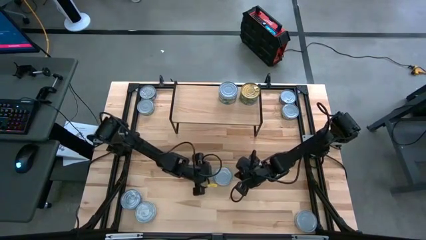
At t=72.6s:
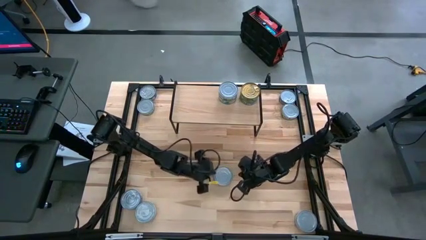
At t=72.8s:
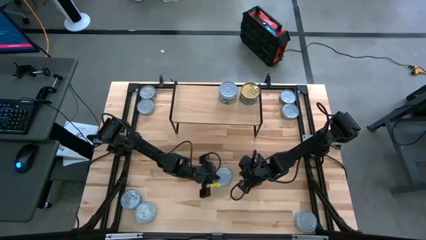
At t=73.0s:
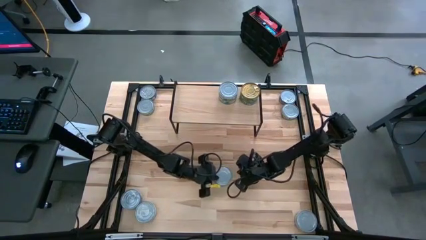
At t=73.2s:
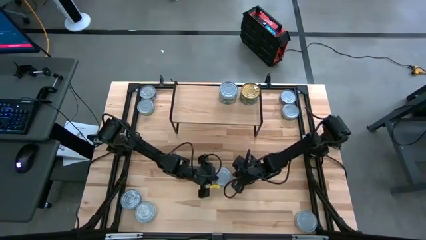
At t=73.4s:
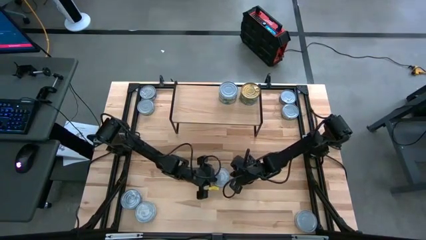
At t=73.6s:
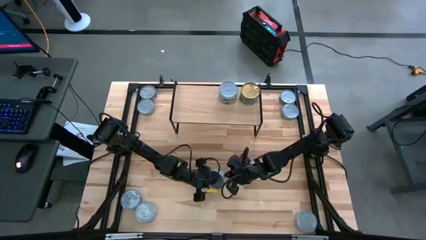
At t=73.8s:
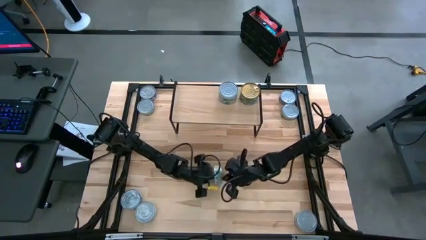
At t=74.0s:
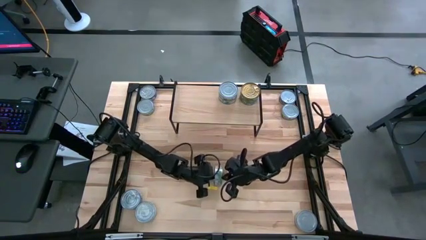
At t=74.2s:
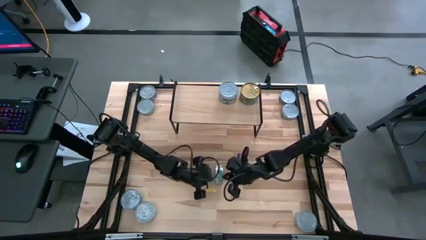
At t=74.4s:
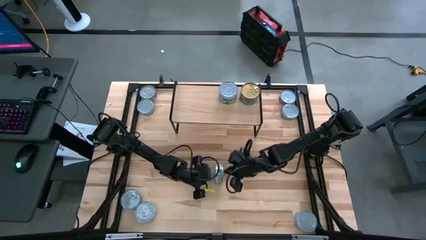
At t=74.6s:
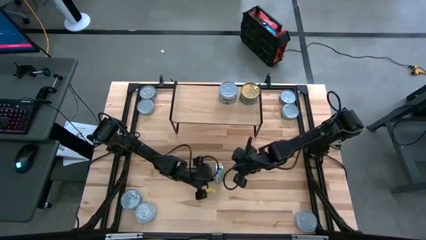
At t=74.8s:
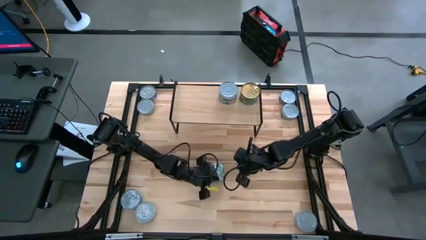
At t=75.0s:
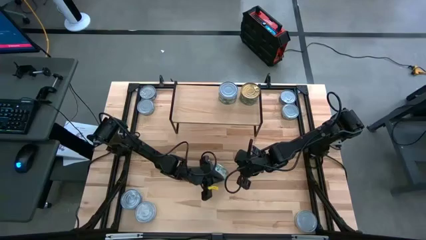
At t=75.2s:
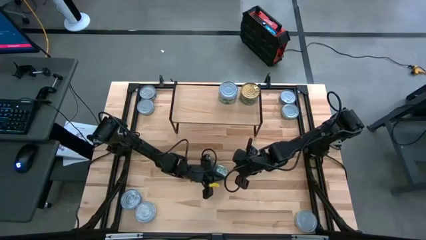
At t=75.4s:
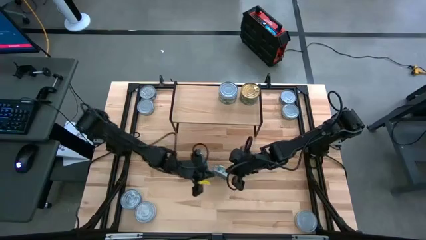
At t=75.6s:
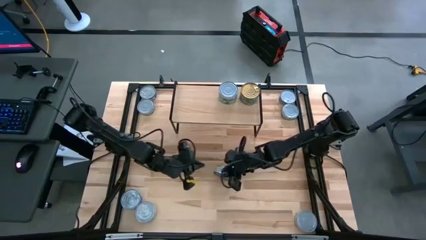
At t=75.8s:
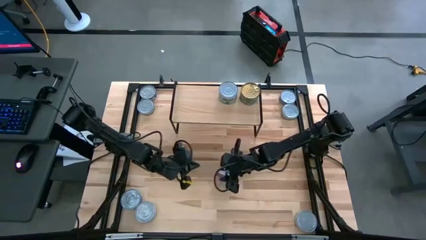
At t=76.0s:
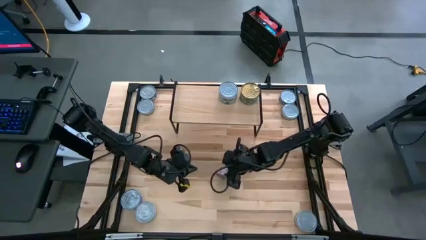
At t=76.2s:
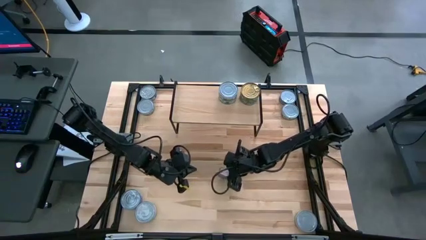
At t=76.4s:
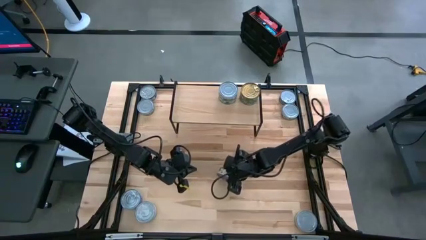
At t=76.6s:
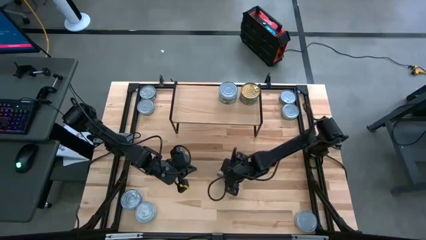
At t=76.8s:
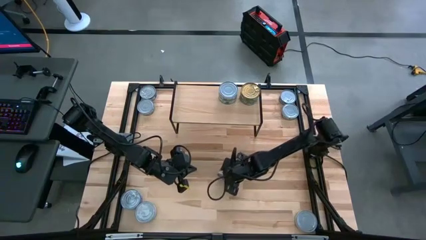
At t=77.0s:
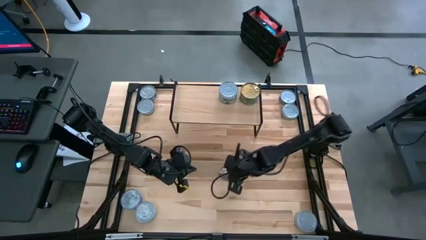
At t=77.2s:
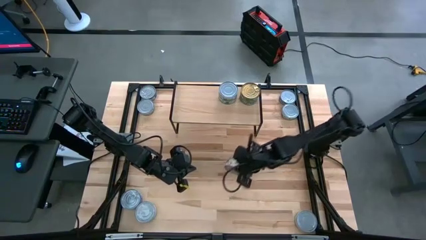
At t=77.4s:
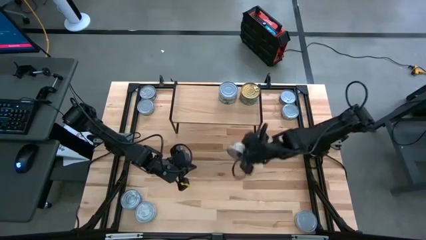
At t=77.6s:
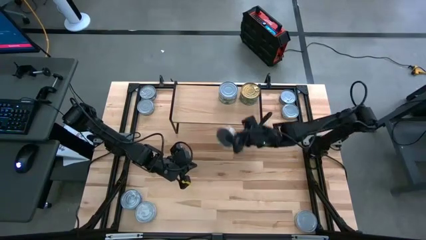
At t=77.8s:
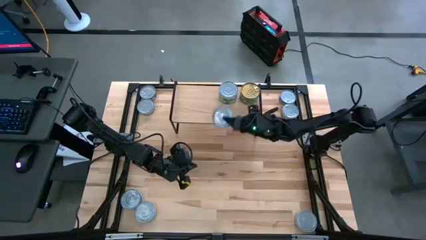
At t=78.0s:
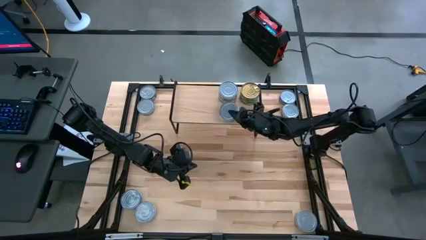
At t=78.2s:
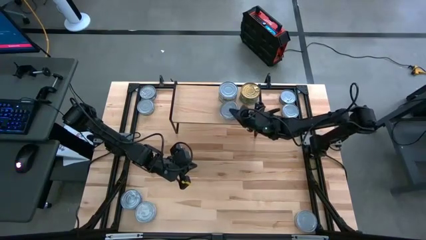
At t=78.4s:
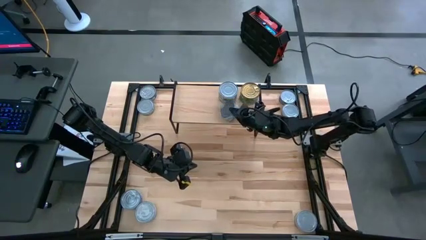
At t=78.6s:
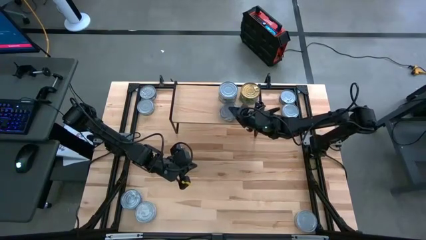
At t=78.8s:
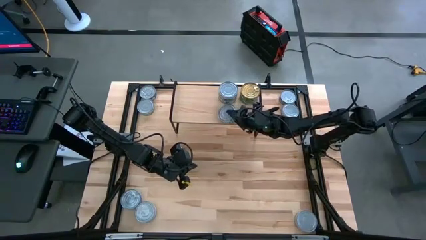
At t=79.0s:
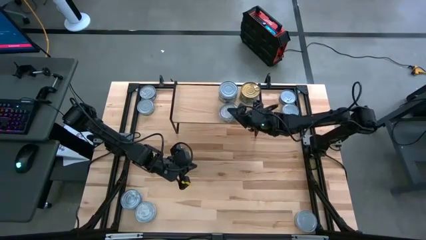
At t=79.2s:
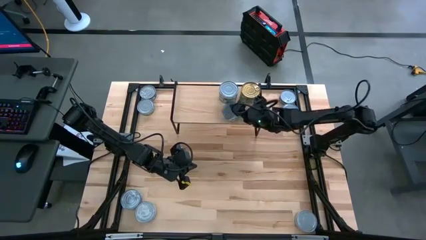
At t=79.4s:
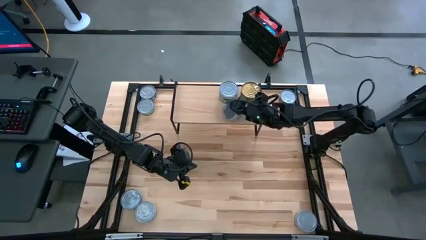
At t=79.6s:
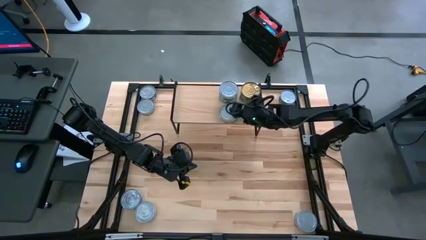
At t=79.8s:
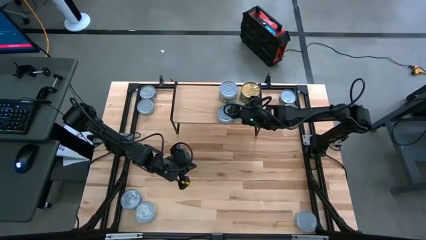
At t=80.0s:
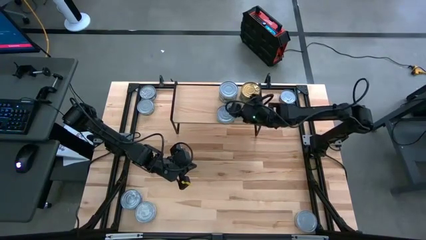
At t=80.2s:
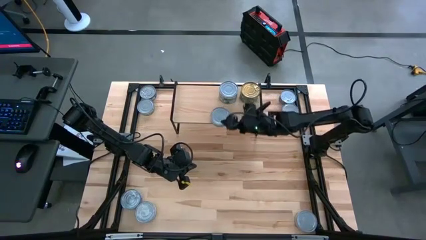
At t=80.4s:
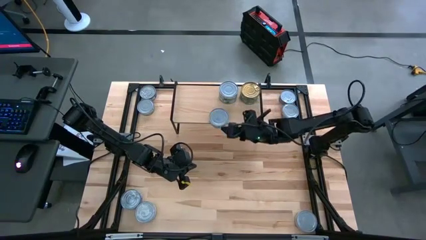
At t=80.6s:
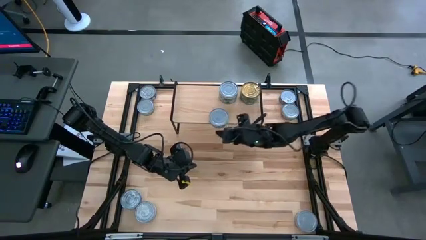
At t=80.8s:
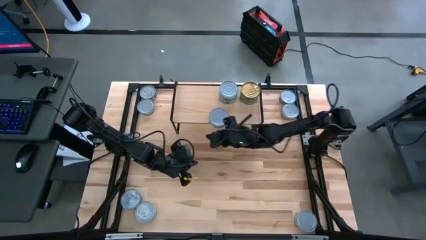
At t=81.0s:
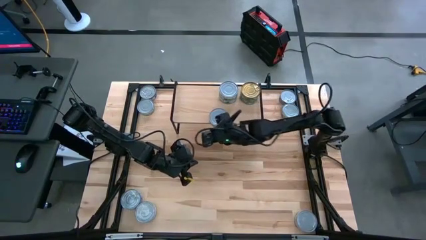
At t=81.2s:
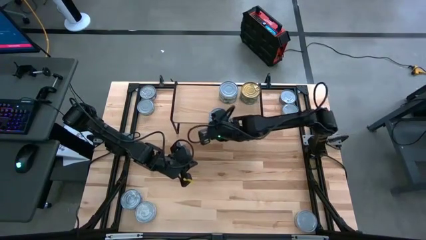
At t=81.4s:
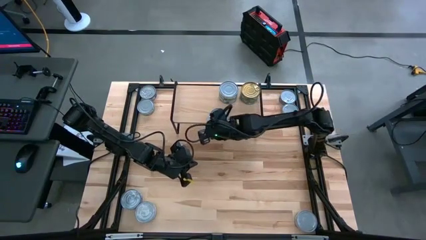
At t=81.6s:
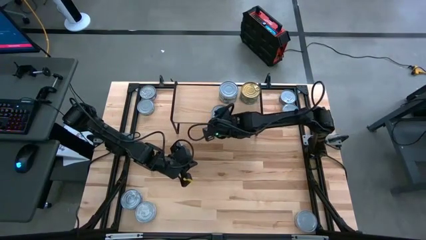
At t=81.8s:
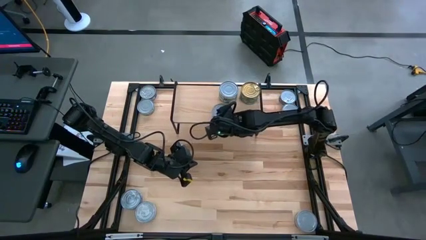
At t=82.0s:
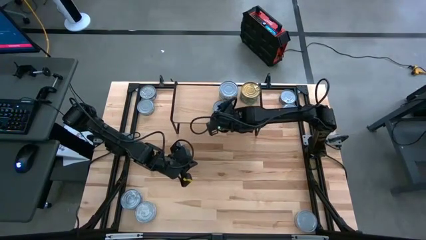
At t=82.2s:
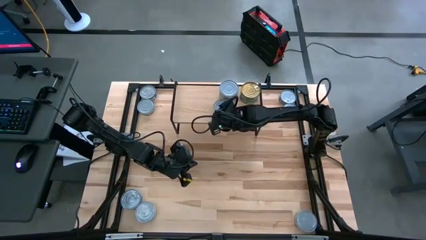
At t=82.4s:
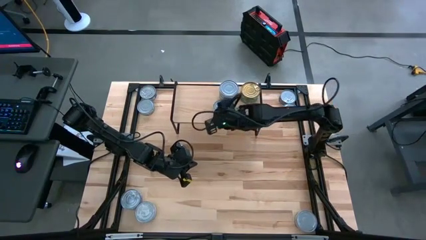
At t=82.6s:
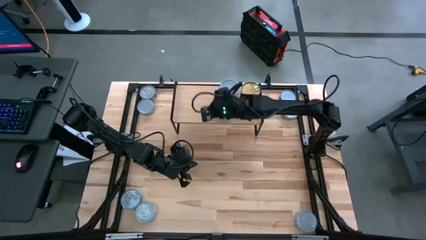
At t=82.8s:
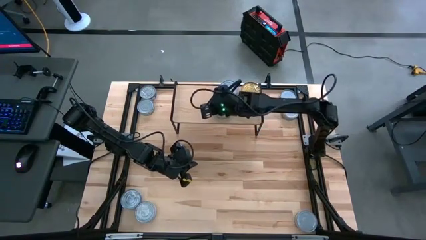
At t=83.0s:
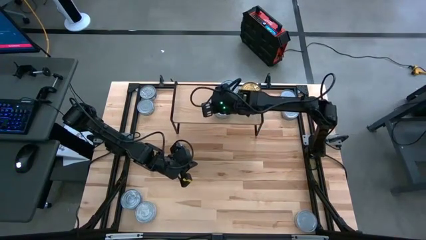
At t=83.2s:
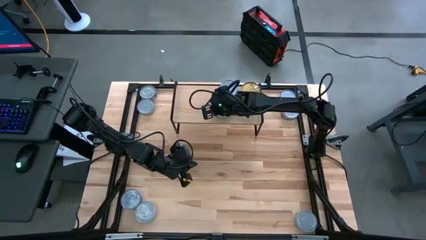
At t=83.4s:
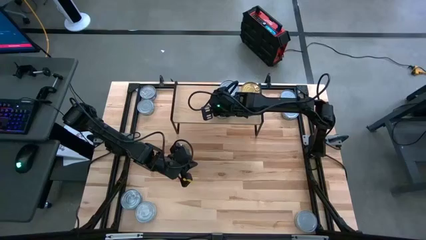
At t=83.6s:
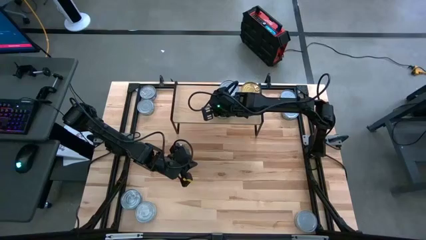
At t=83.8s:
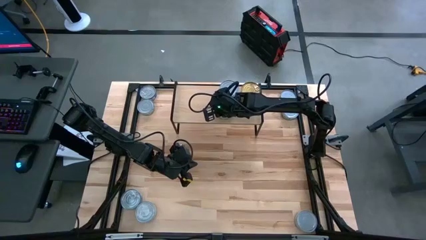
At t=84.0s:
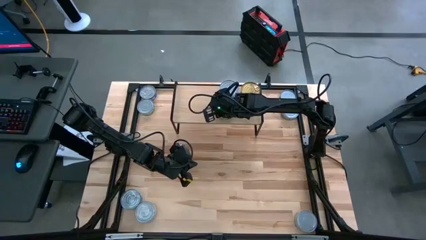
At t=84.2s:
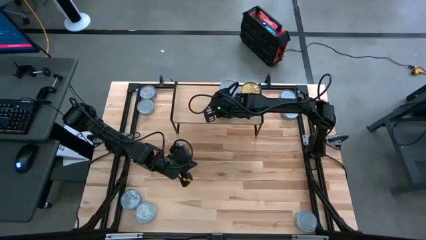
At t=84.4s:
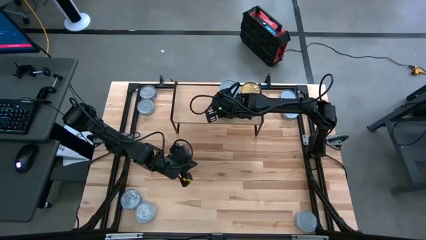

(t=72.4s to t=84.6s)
Task: Stack canned seafood by type on shelf
Put the light green tuna can on the shelf

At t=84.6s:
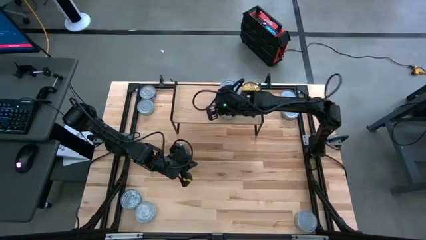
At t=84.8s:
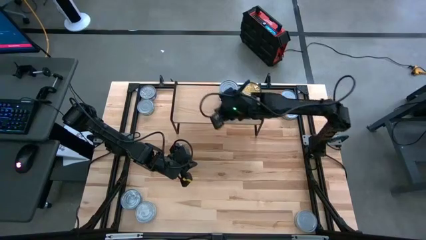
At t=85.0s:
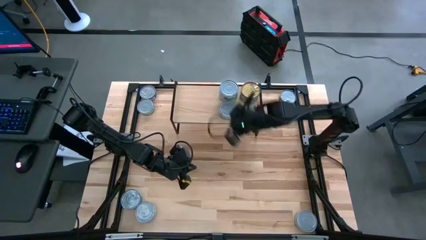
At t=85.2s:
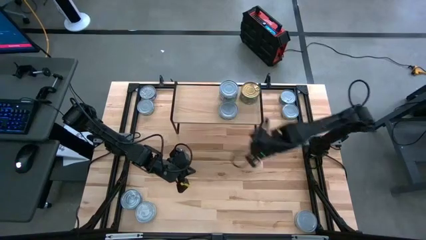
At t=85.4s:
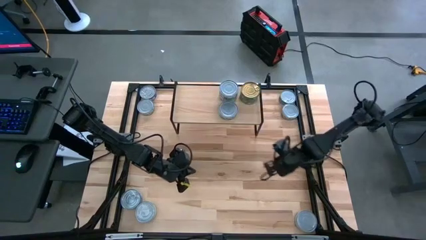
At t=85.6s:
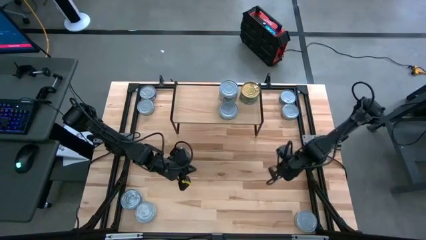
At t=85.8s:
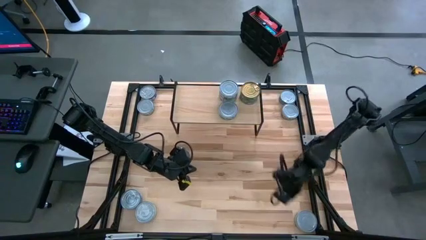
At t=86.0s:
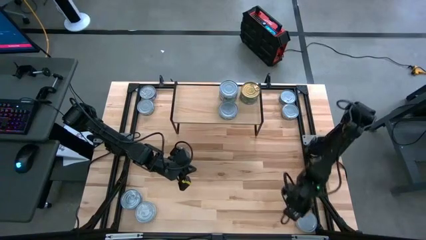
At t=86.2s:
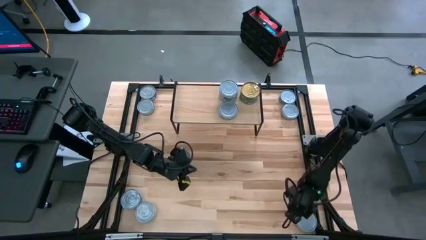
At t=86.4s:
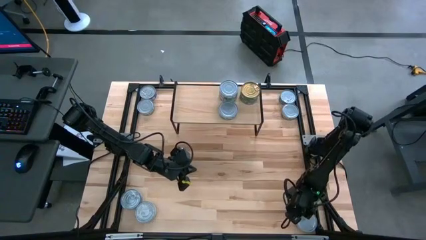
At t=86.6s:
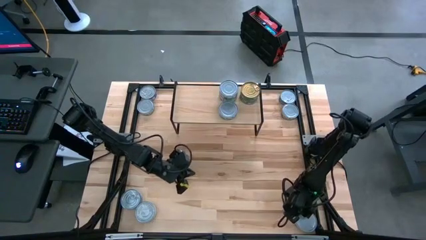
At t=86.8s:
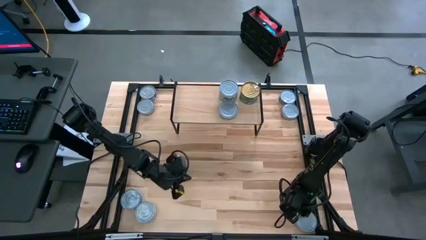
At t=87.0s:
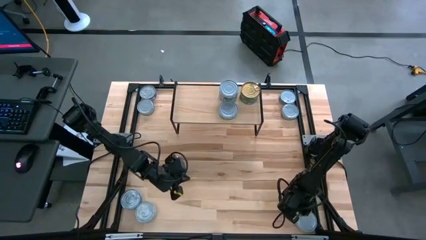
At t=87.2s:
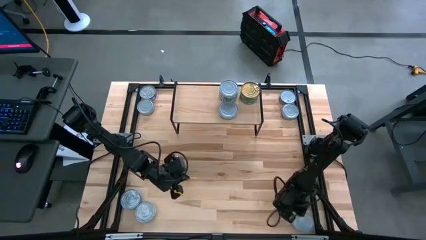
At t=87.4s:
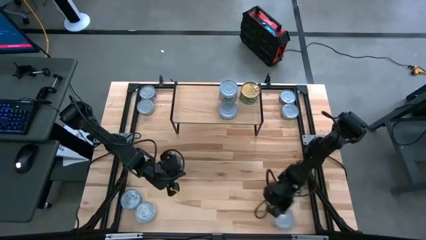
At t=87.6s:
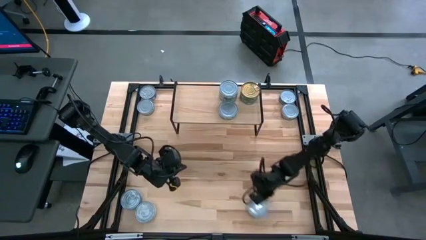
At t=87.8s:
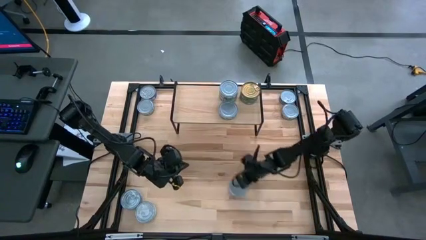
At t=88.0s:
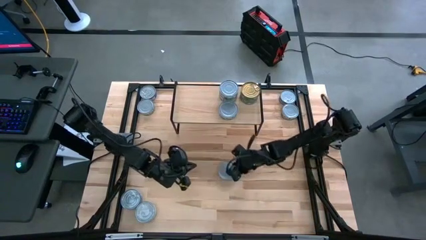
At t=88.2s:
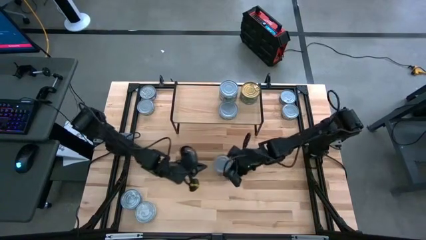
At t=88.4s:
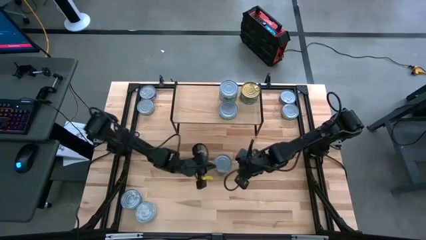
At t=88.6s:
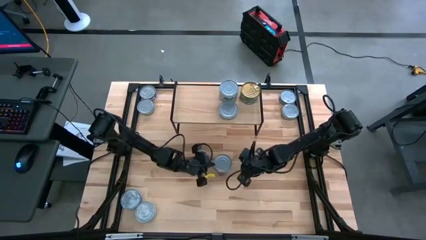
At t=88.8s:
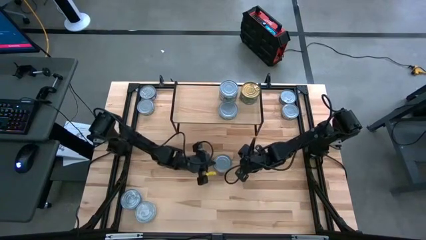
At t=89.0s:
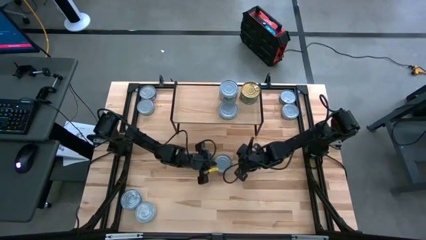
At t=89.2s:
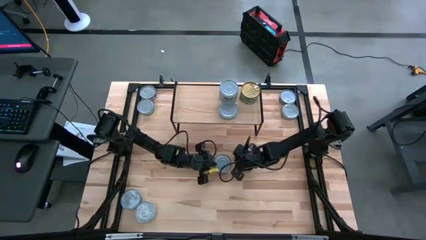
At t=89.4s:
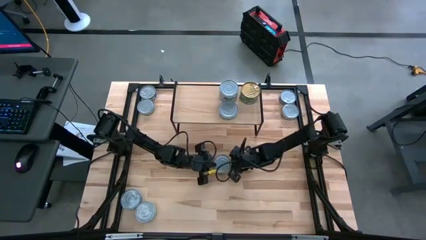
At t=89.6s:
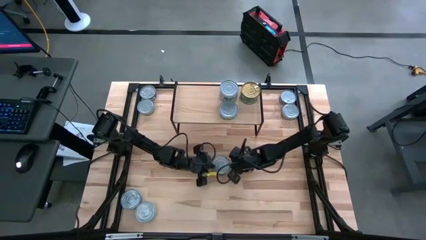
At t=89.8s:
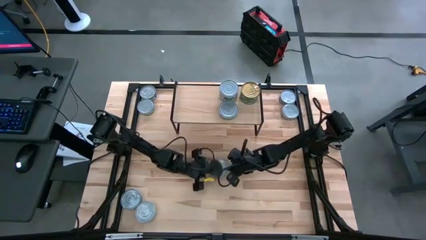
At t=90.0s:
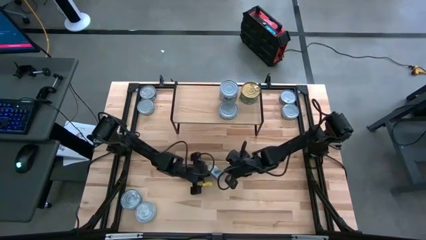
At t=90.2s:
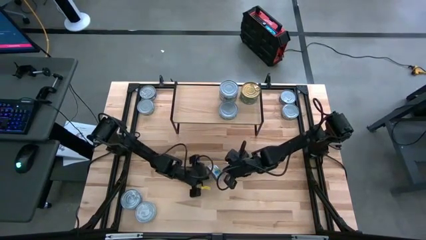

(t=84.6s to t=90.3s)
Stack the light green tuna can on top of the other light green tuna can on the shelf
